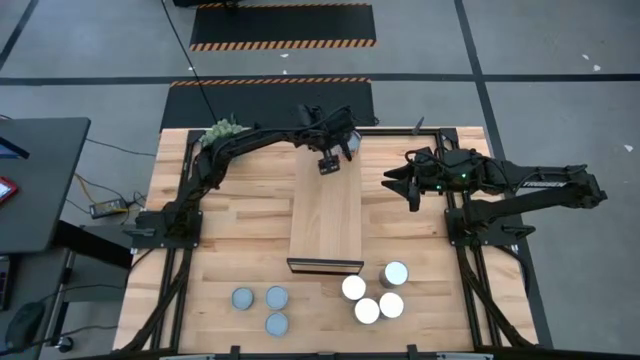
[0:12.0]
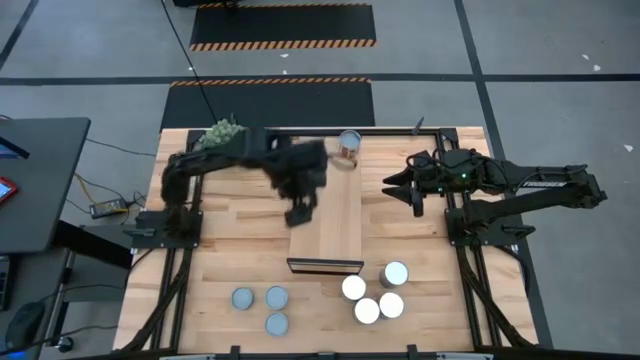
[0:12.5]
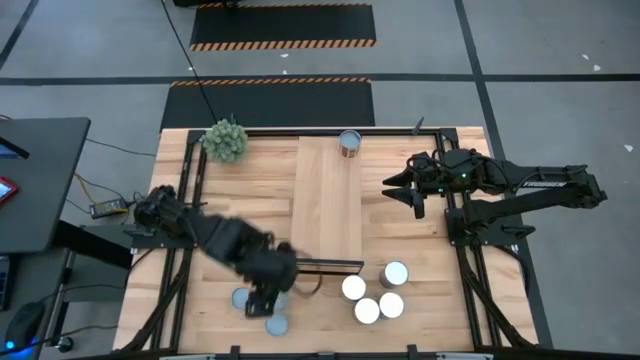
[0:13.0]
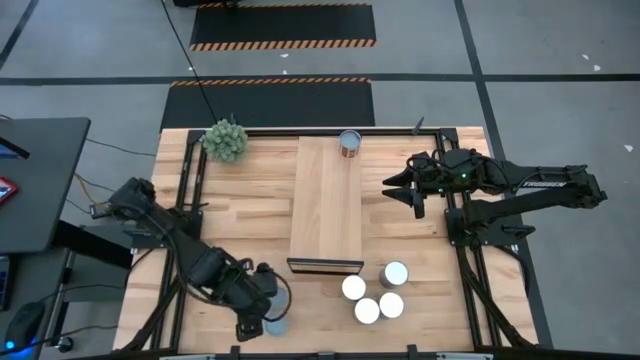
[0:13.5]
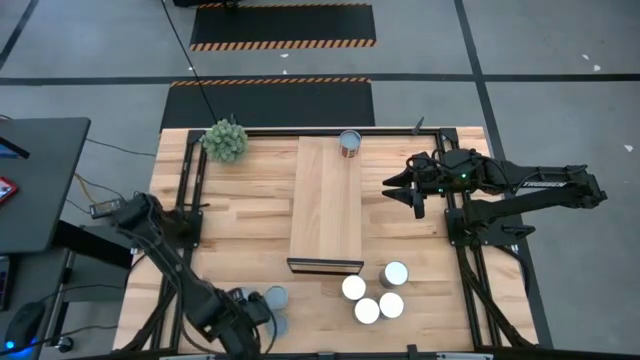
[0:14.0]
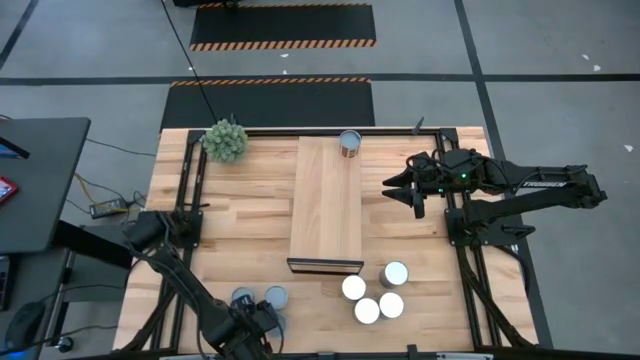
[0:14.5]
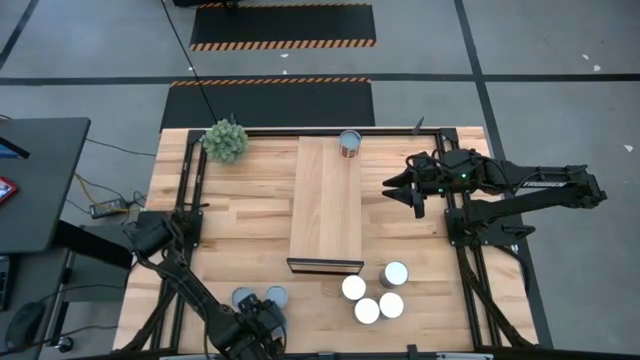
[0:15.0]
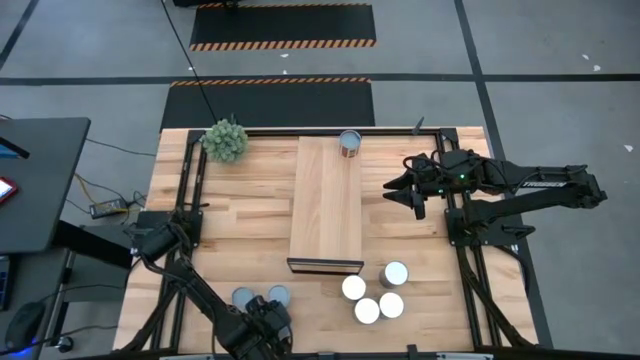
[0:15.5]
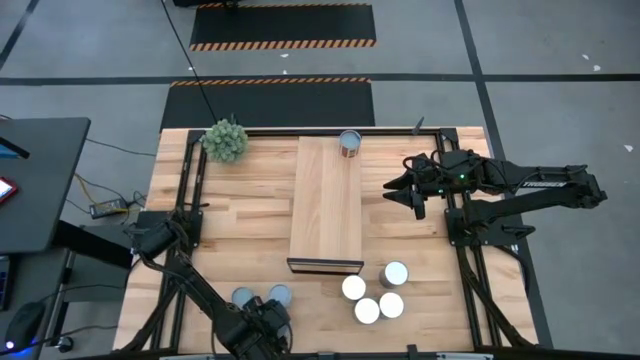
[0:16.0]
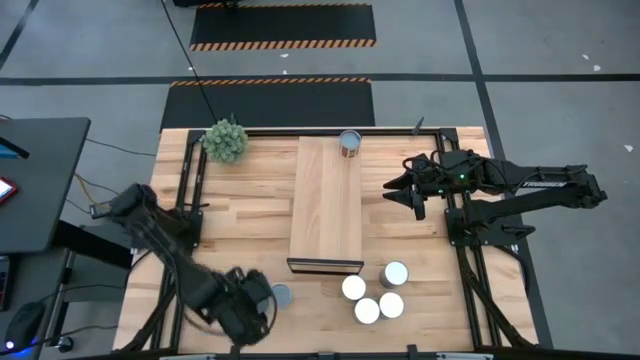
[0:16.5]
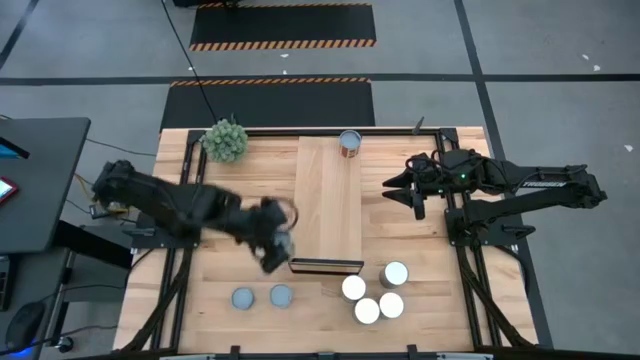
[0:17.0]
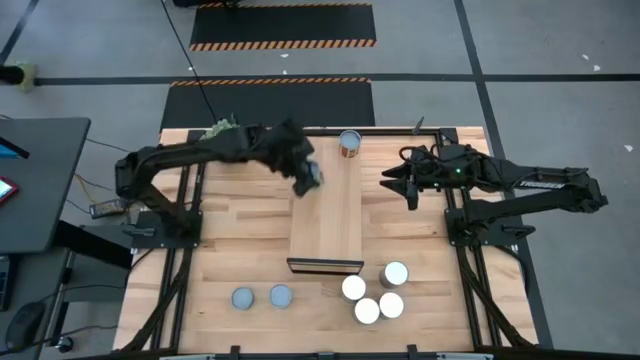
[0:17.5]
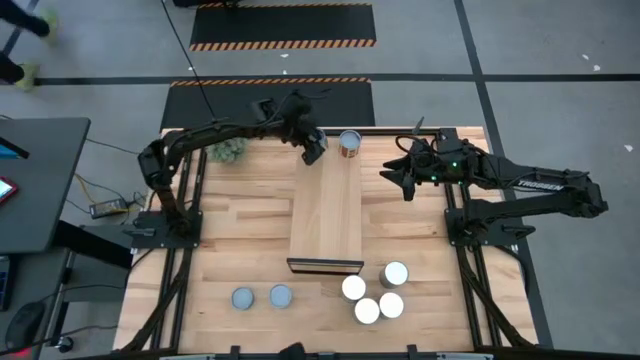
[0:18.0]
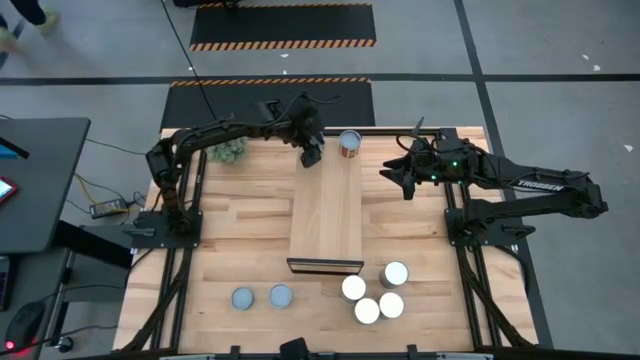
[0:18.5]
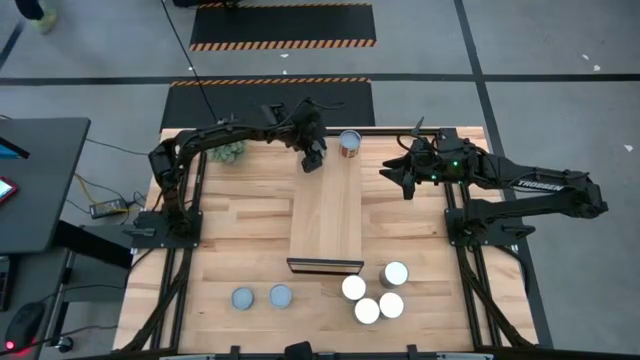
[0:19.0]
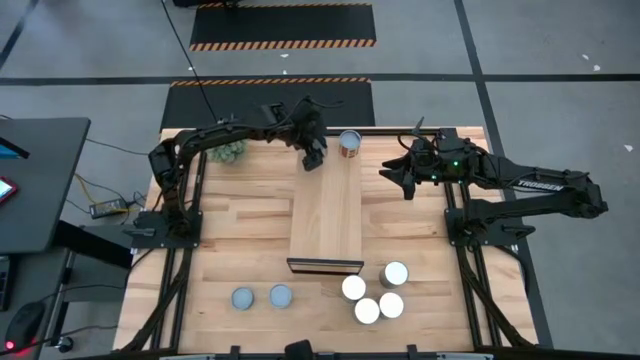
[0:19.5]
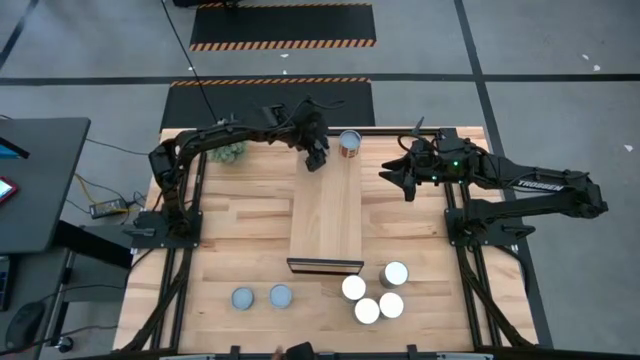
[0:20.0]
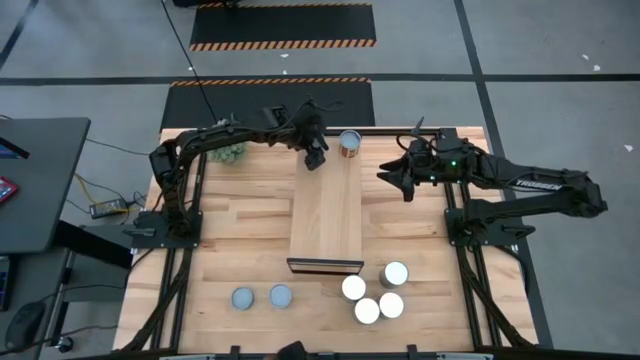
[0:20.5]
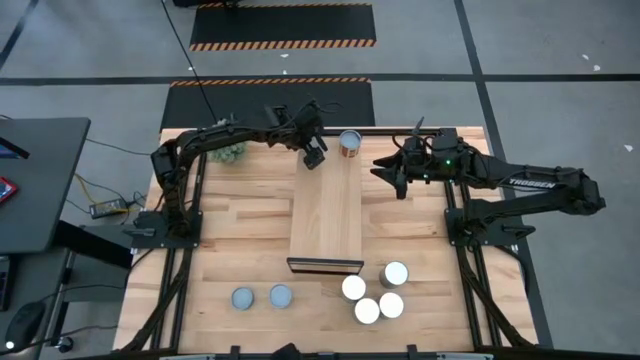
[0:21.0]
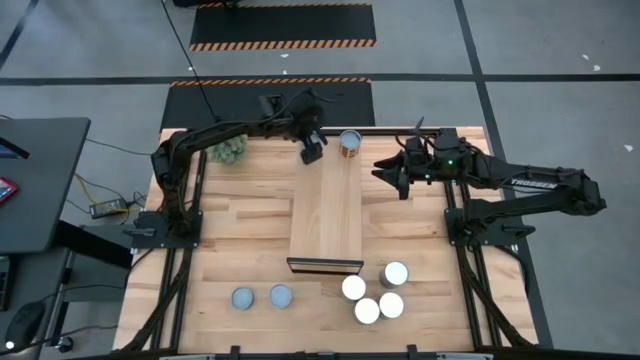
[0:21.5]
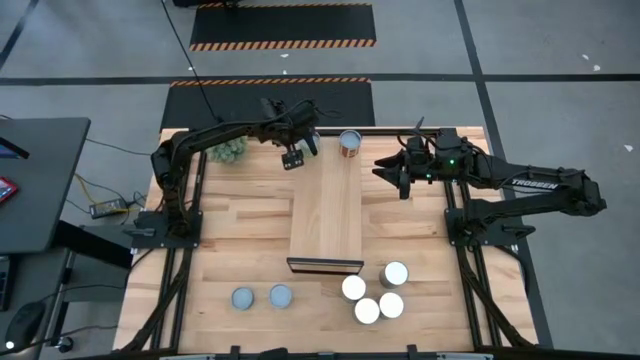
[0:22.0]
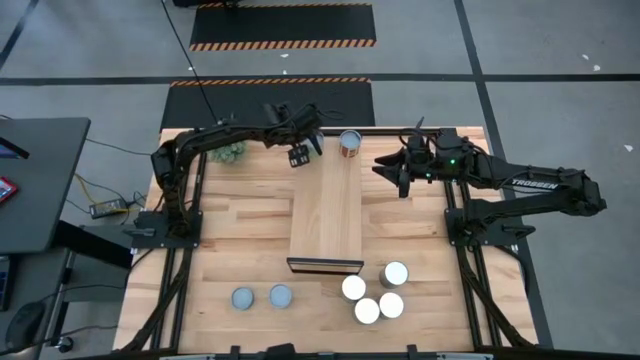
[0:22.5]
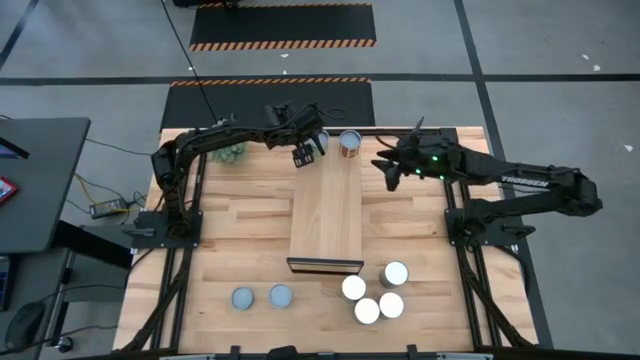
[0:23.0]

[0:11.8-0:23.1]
Task: Pick and place cans onto a shelf
Put the small canned peas on the shelf

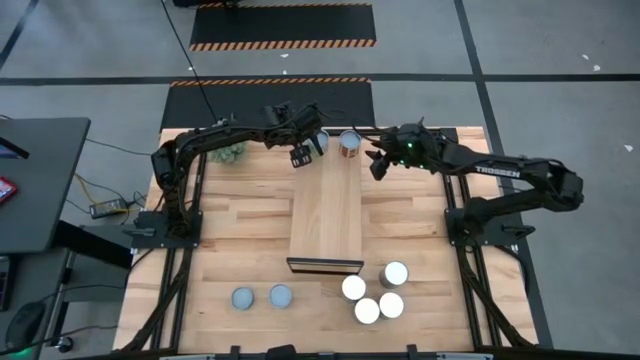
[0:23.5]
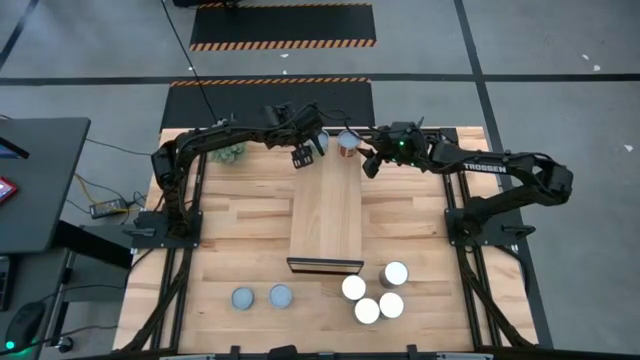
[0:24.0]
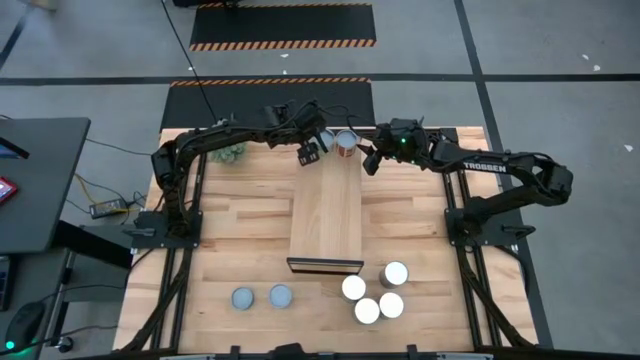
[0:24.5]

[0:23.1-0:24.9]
Adjust the canned goods on the shelf

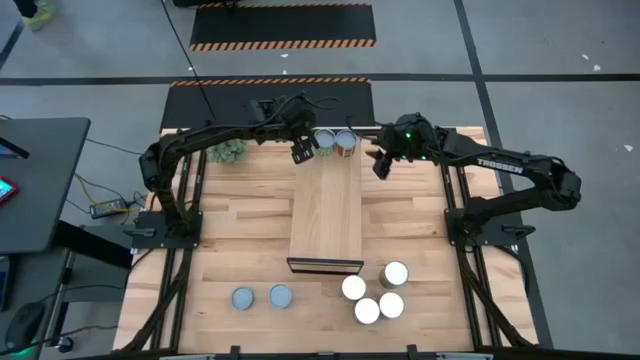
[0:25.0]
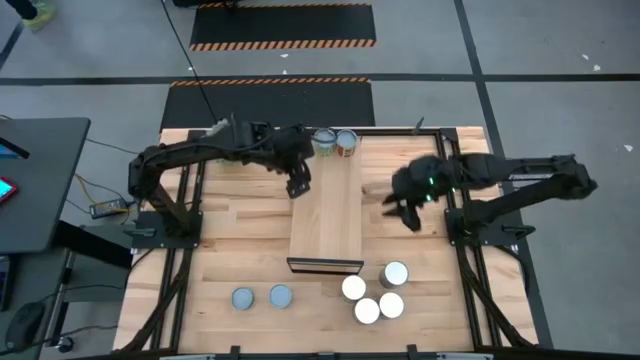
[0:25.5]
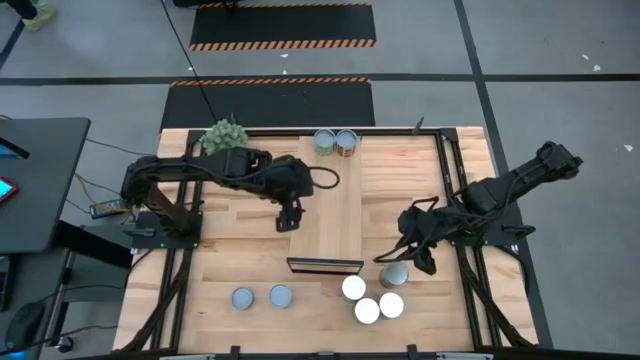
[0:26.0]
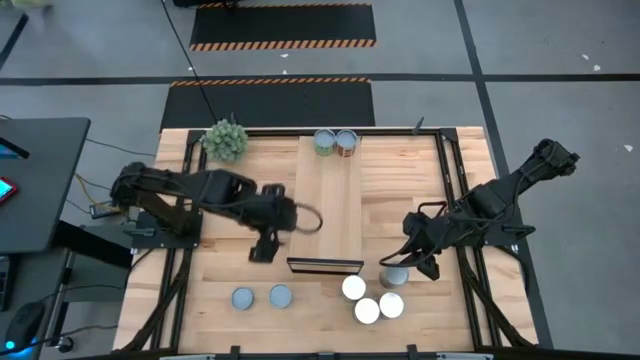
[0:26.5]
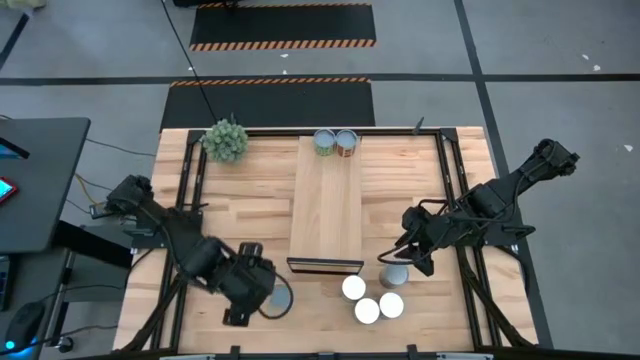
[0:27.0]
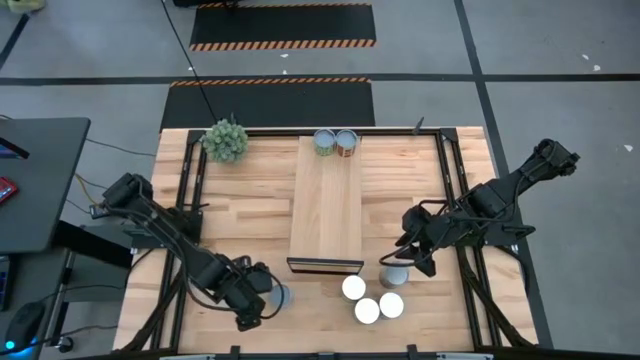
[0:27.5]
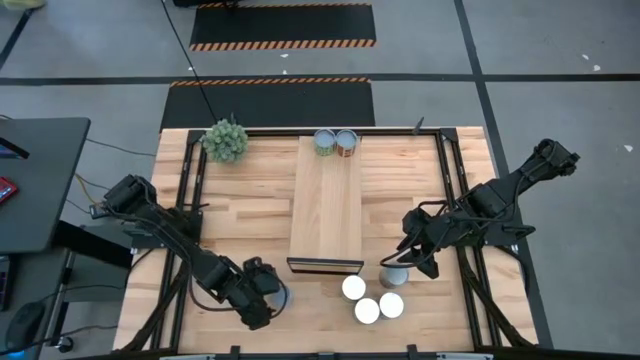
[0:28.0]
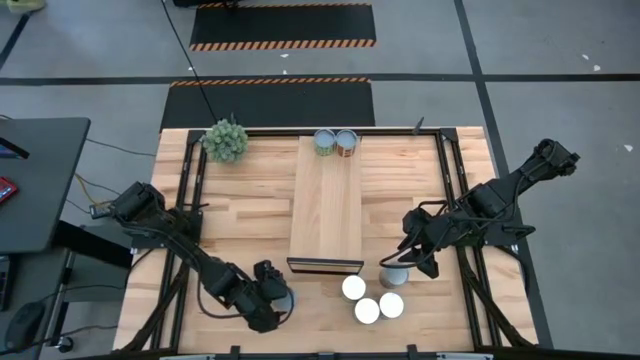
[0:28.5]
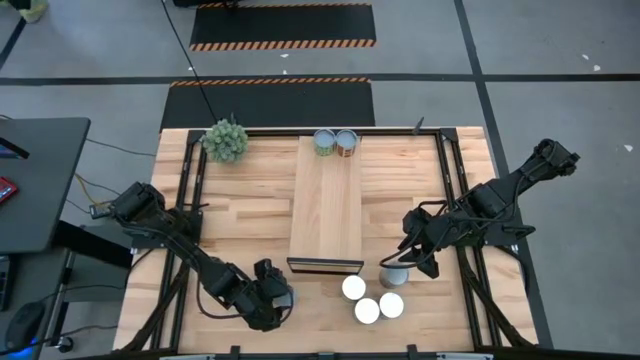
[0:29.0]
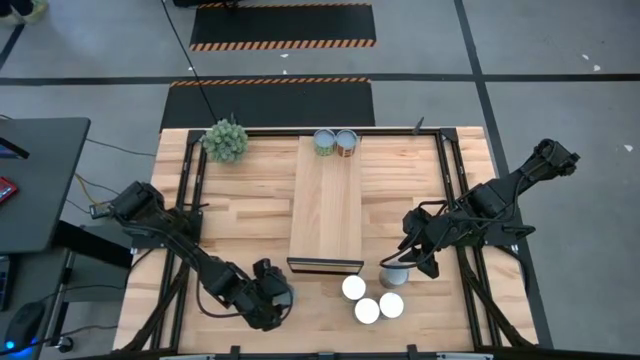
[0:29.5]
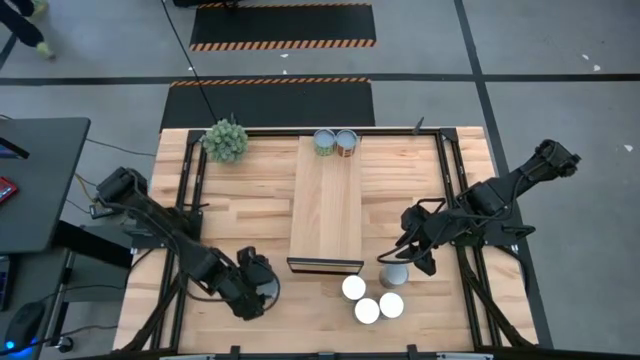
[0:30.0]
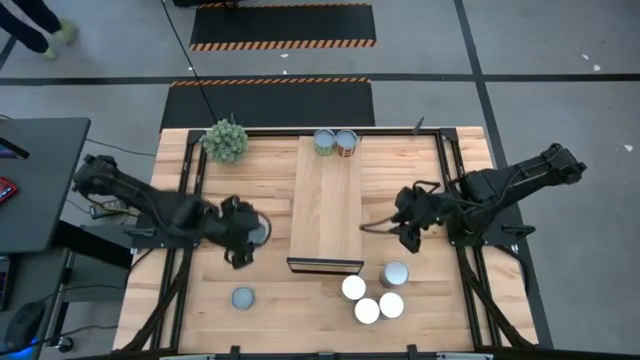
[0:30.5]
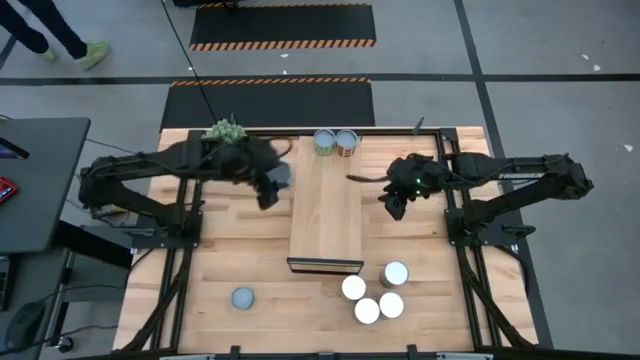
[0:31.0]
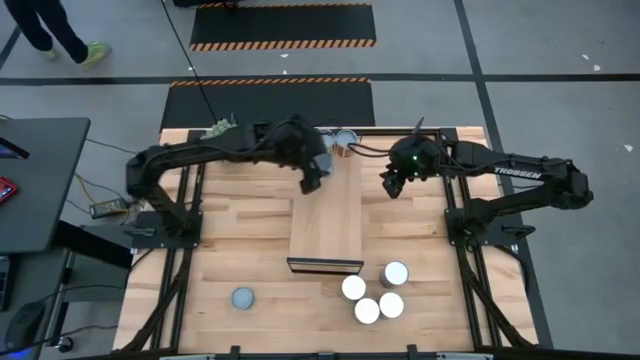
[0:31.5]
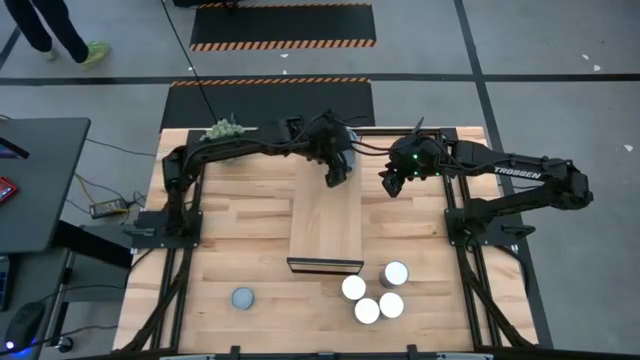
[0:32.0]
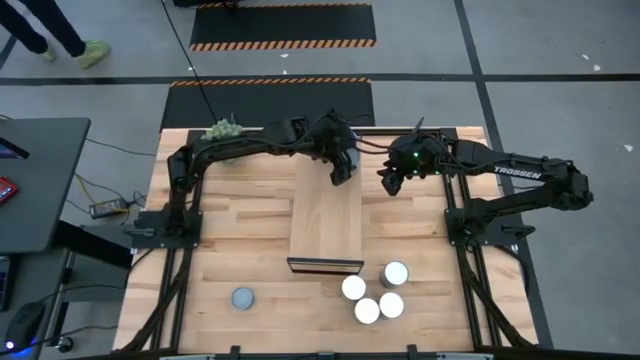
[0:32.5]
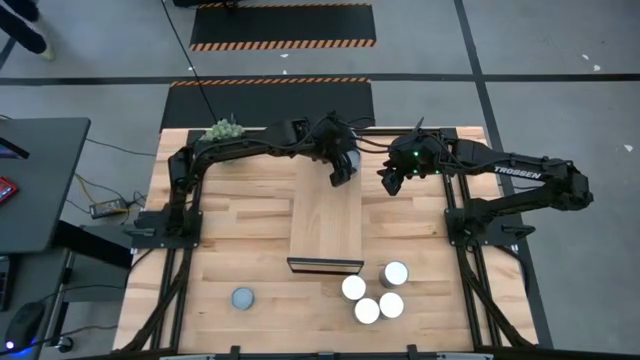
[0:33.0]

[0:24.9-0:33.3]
Put the large canned mixed vegetables on the shelf
